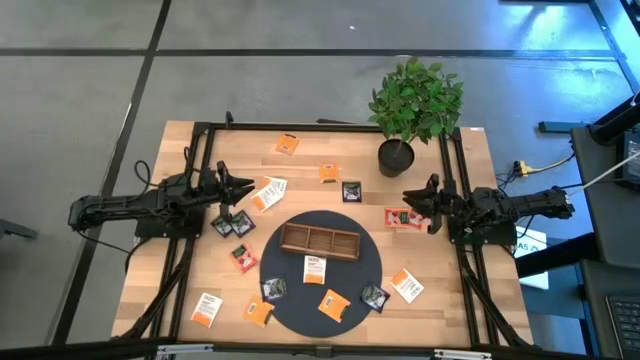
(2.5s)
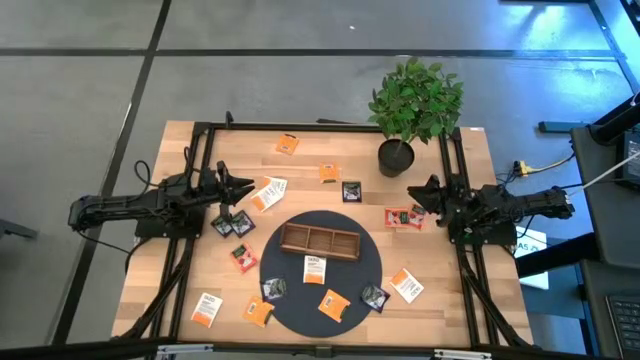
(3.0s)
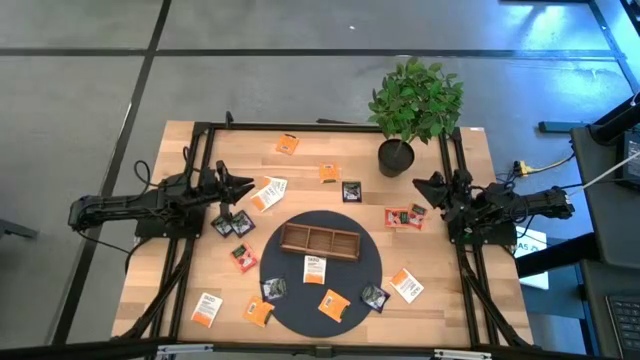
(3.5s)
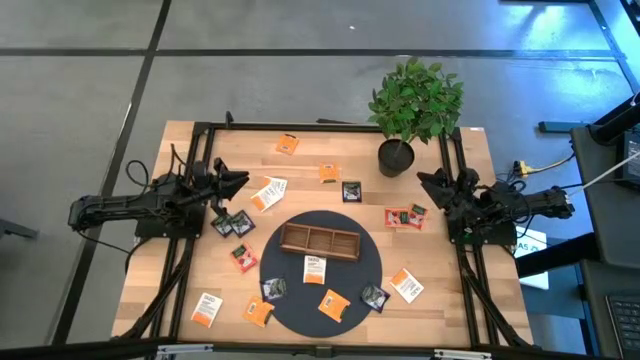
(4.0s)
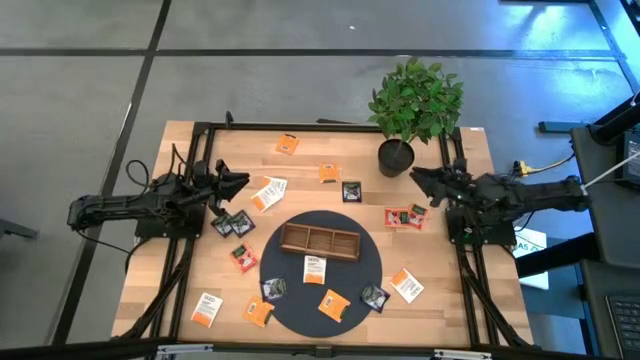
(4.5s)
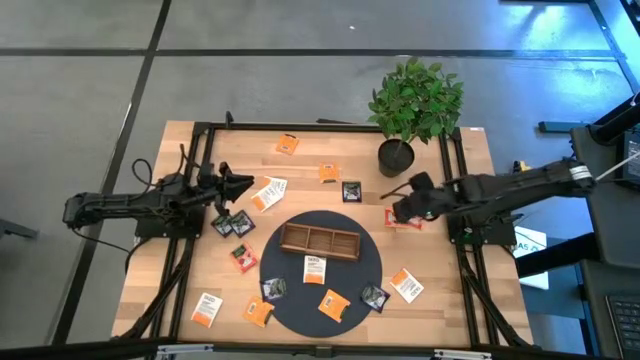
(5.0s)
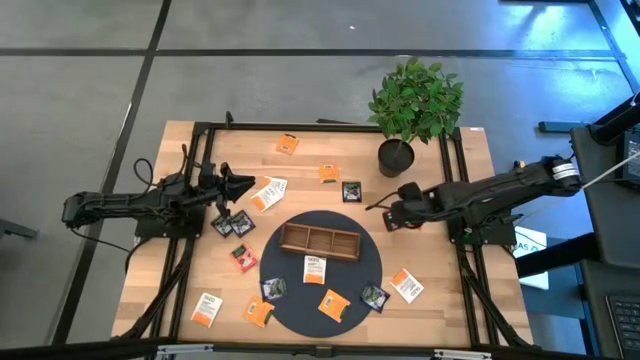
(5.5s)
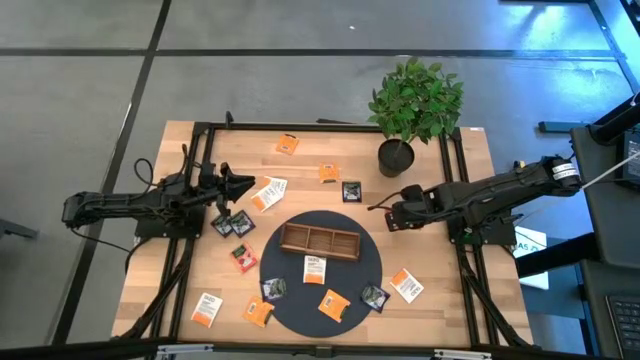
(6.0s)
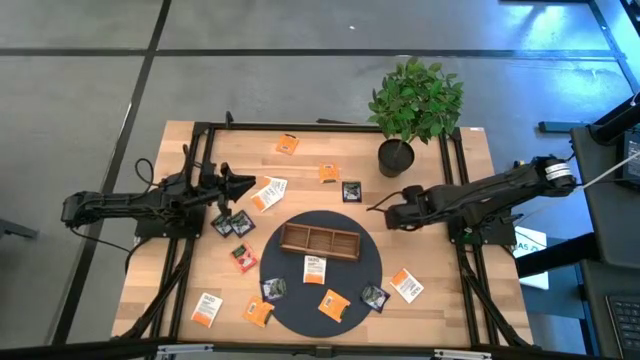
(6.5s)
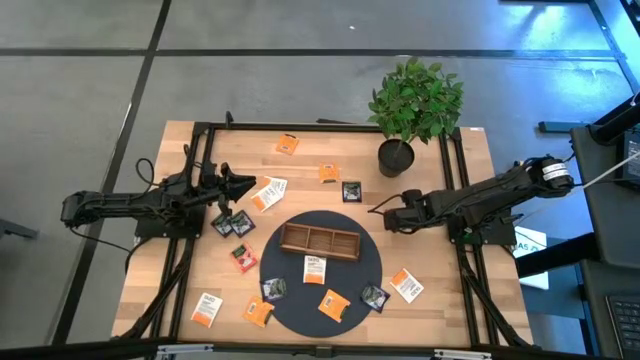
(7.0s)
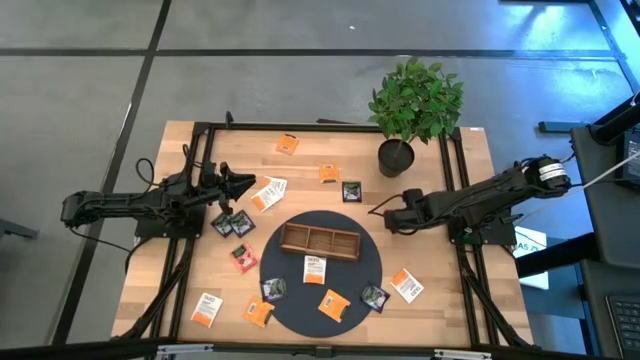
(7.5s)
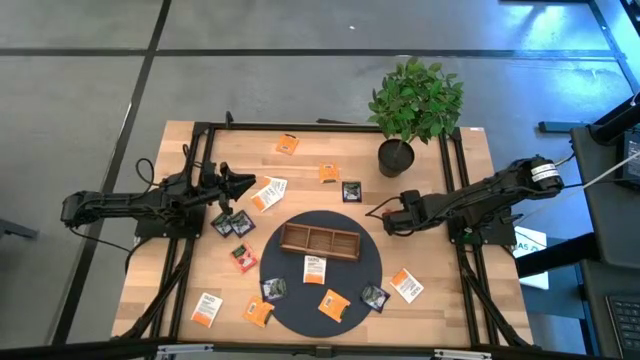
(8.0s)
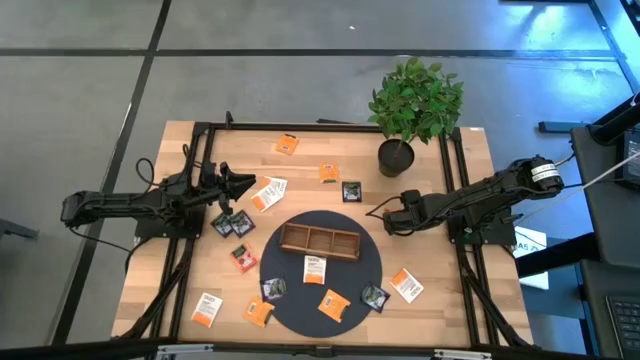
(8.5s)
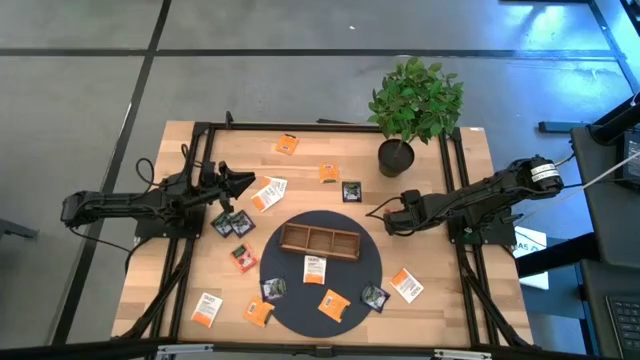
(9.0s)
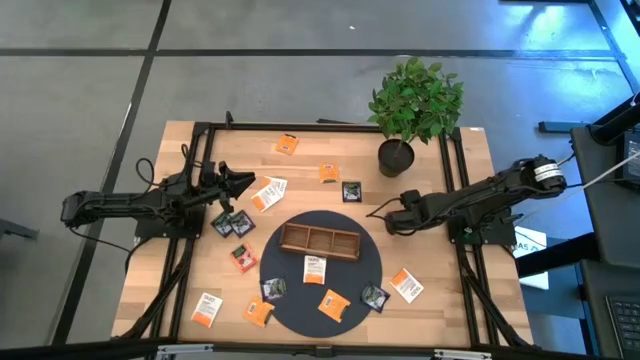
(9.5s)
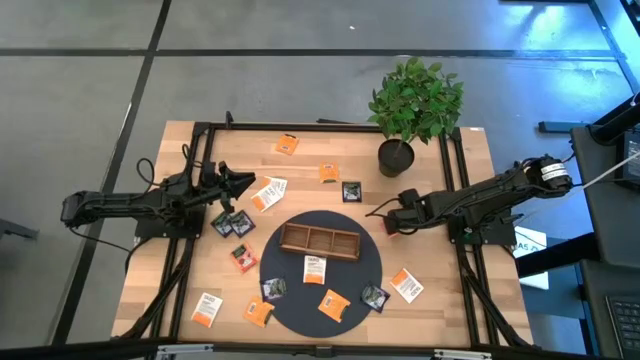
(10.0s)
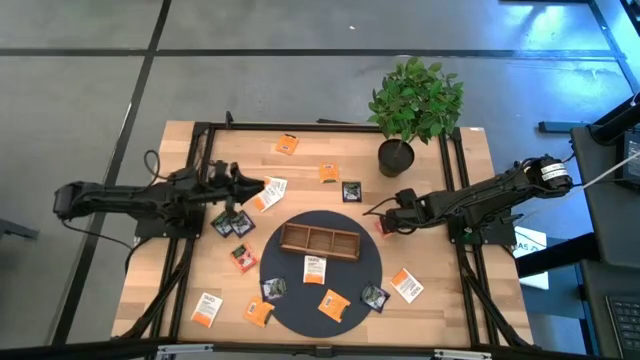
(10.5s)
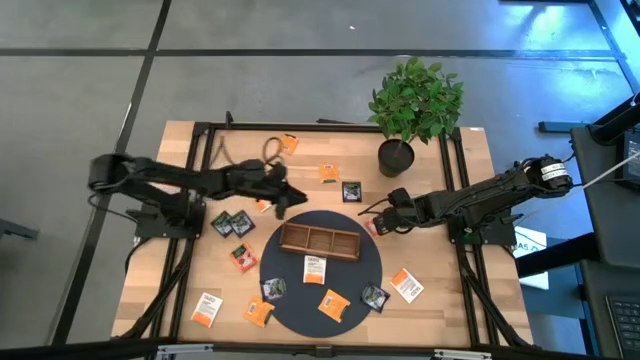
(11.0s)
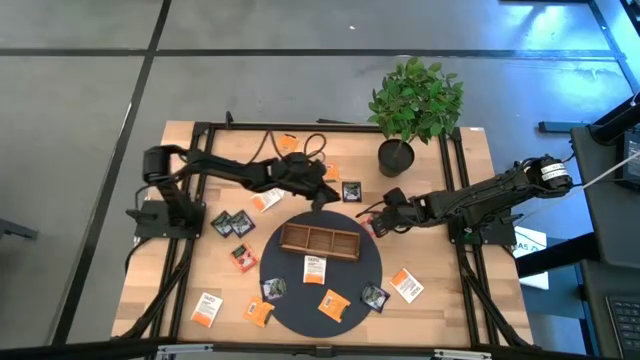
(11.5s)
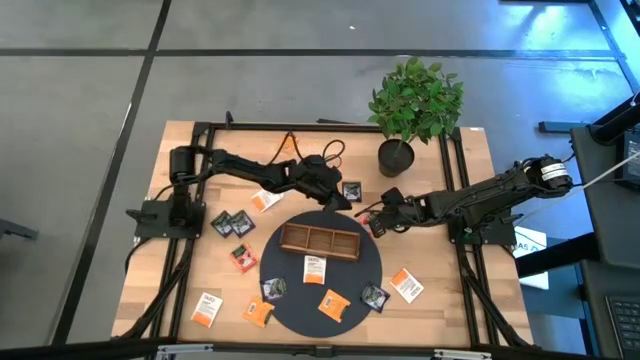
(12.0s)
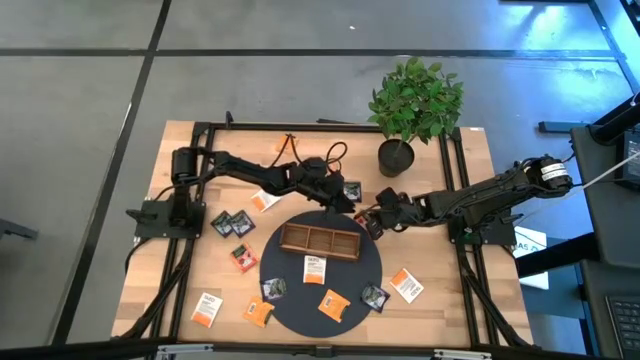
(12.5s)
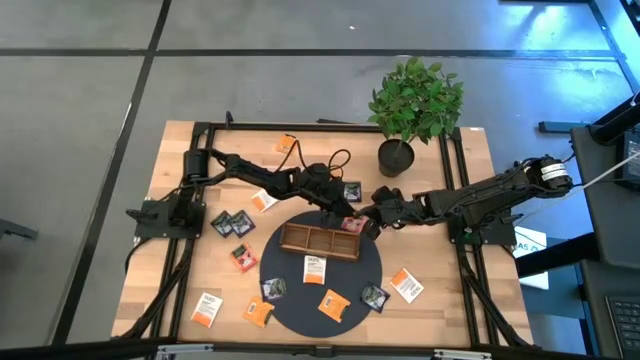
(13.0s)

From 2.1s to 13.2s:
Task: Pick & Place Tea
Put the orange tea bag into the right section of the wooden organizer

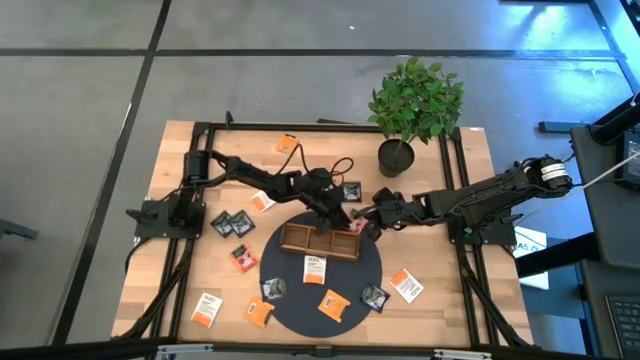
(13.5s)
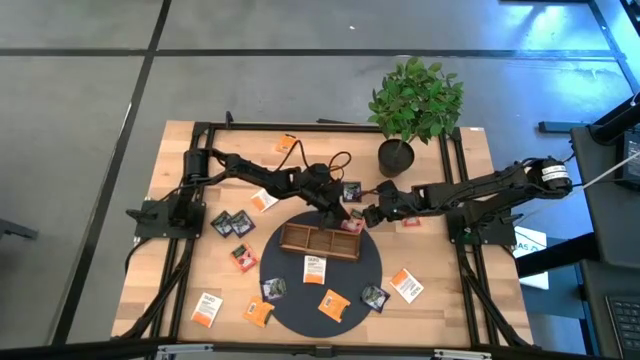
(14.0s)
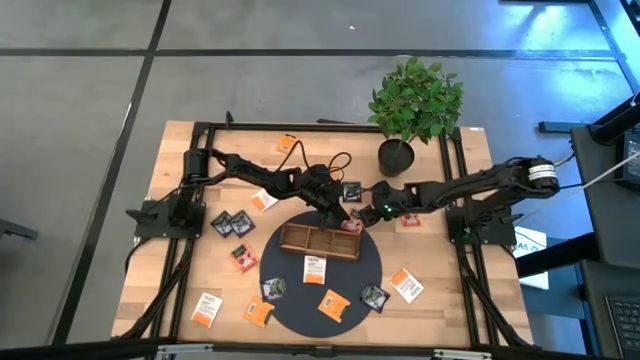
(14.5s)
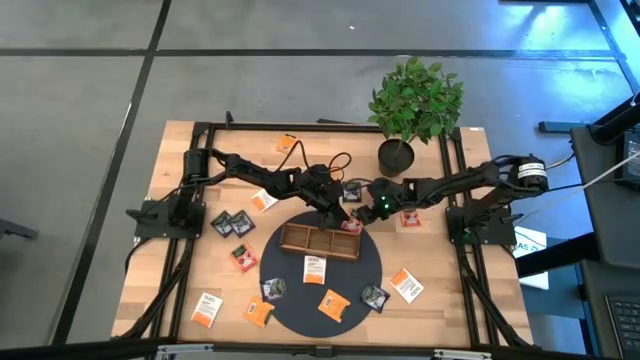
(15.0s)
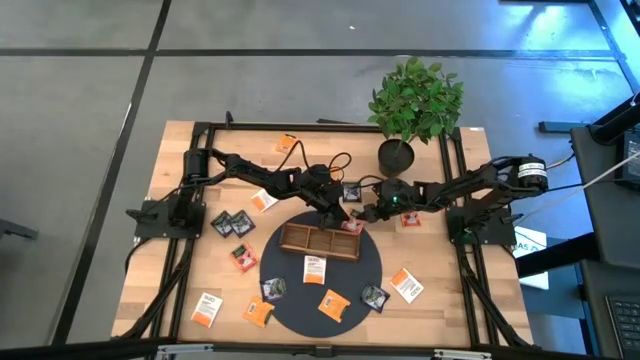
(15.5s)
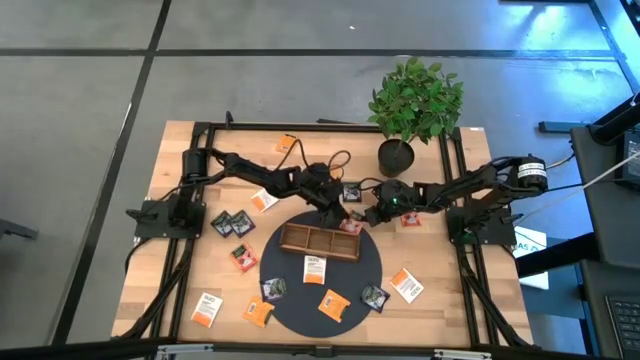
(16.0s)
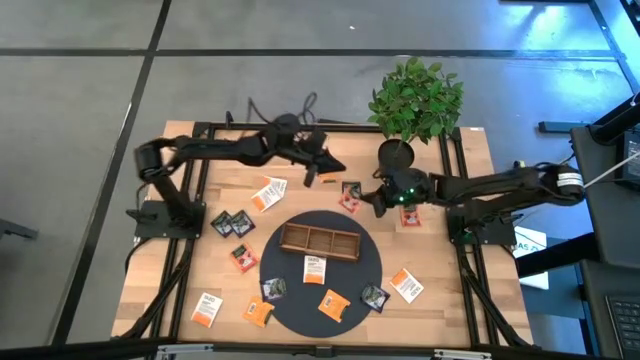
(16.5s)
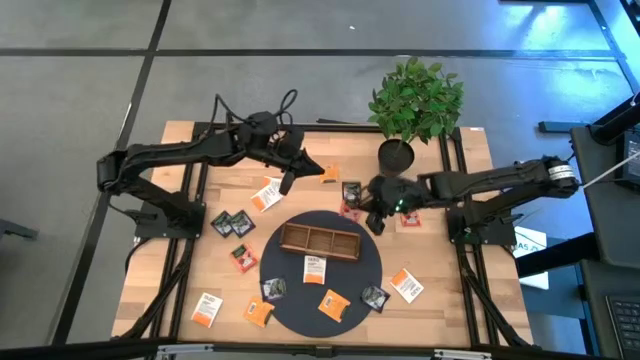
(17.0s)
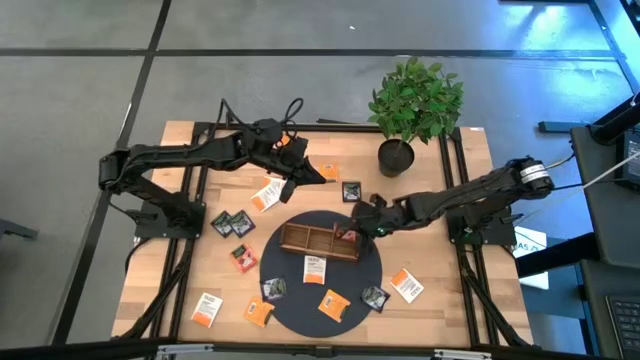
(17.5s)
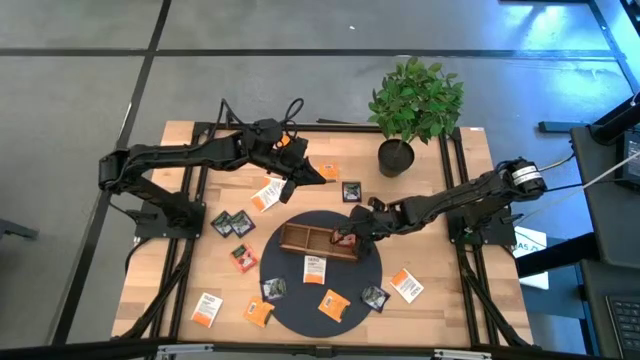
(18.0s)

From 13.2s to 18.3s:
Put the orange tea bag into the right section of the wooden organizer

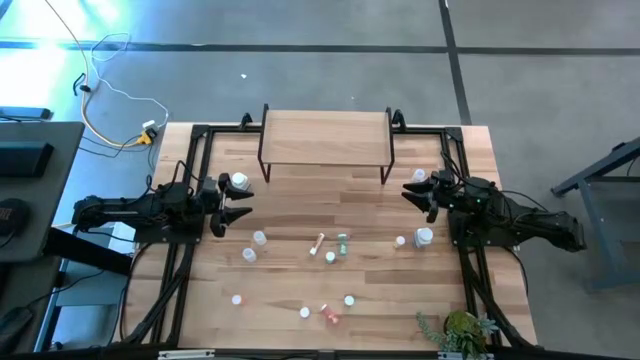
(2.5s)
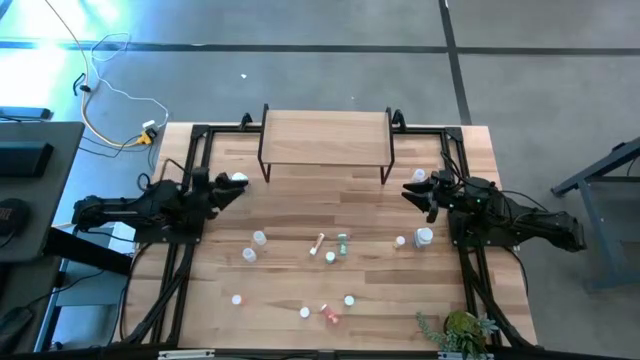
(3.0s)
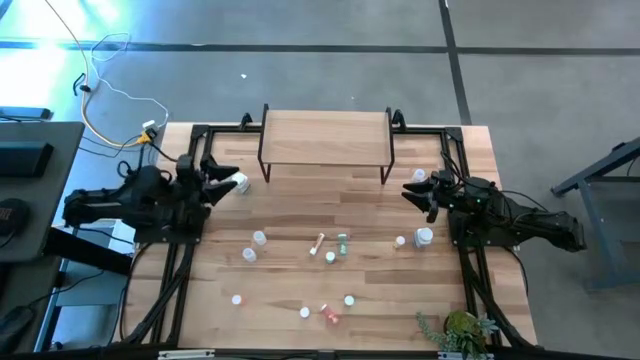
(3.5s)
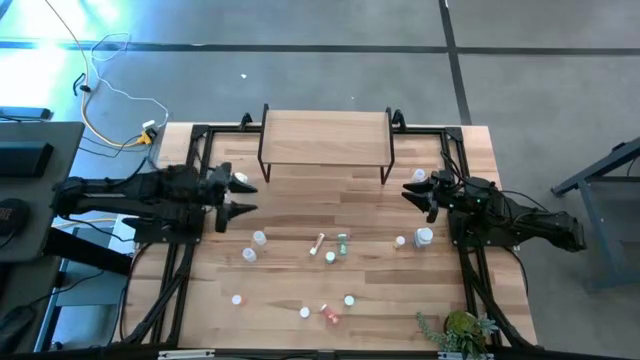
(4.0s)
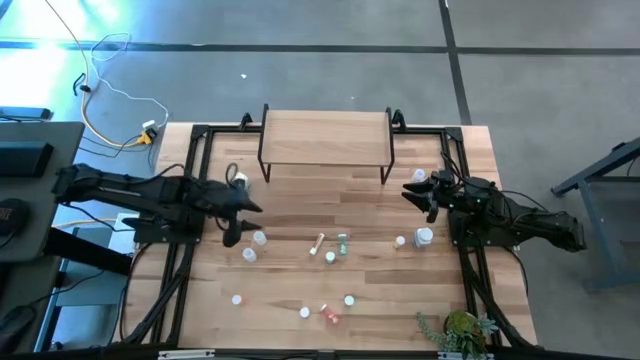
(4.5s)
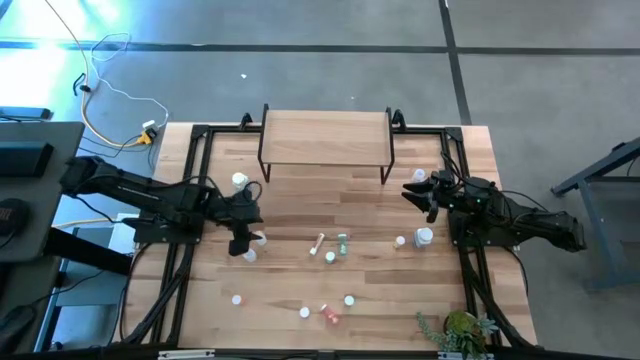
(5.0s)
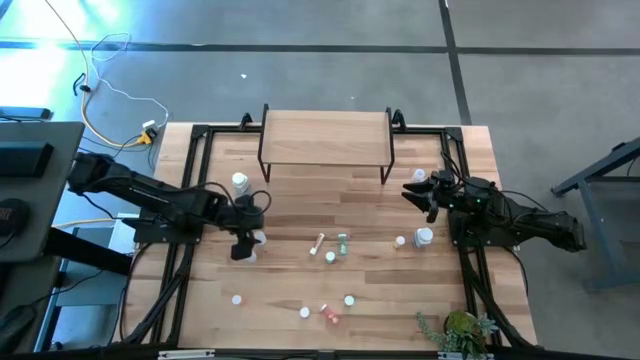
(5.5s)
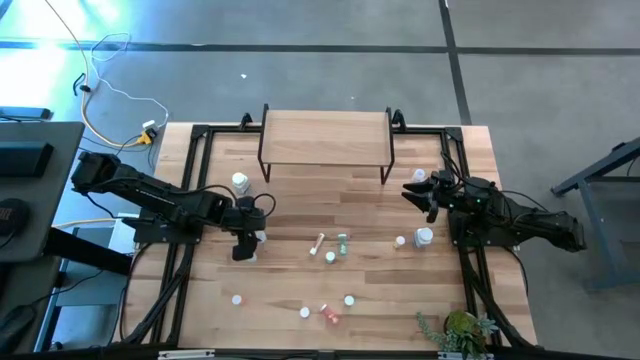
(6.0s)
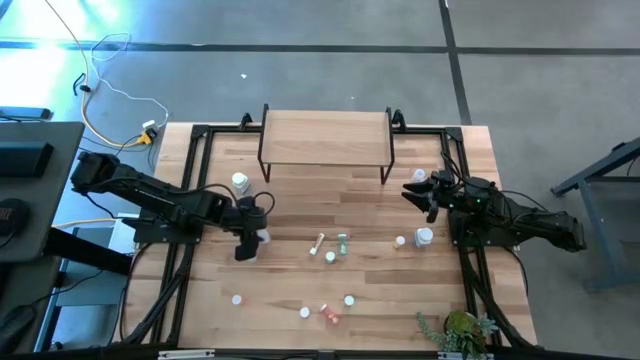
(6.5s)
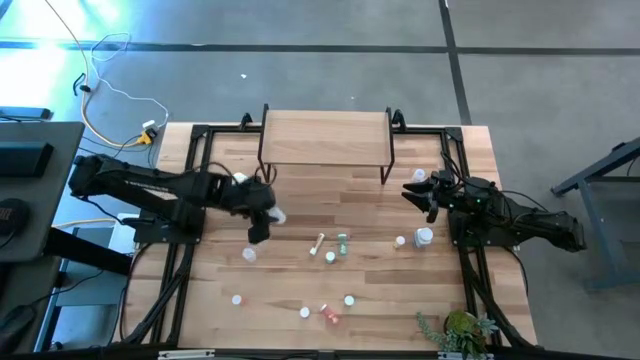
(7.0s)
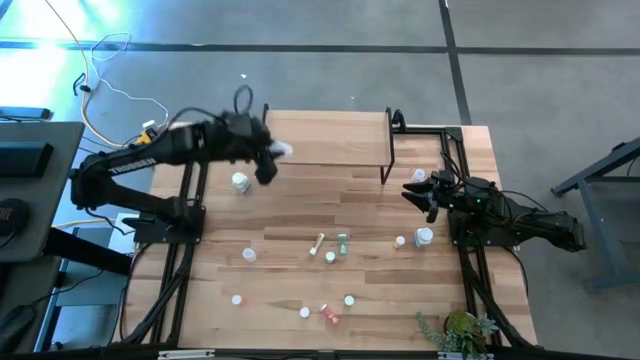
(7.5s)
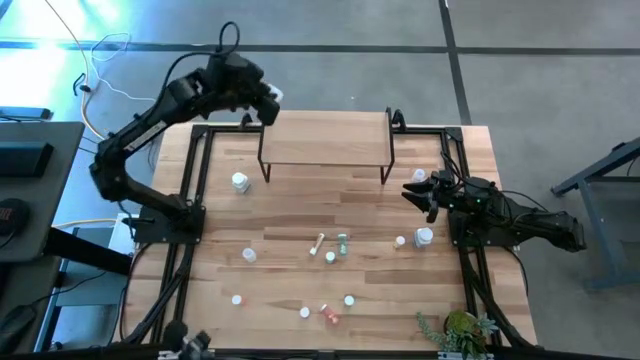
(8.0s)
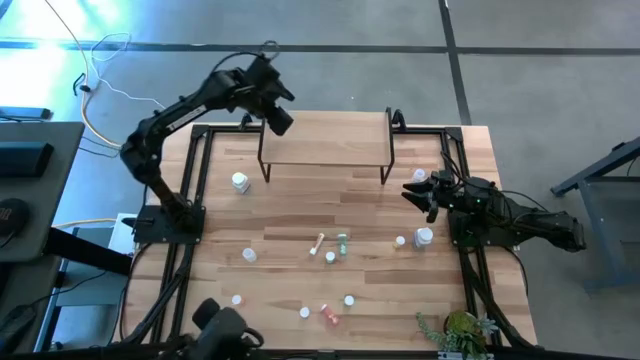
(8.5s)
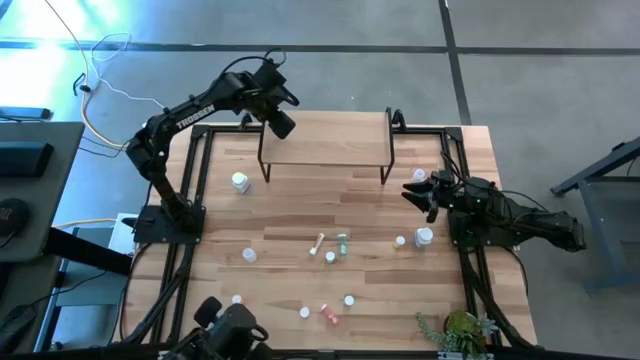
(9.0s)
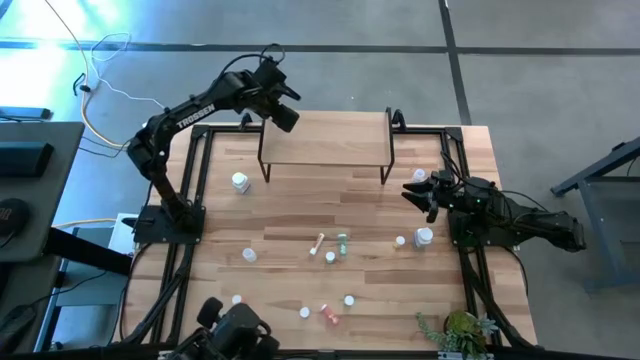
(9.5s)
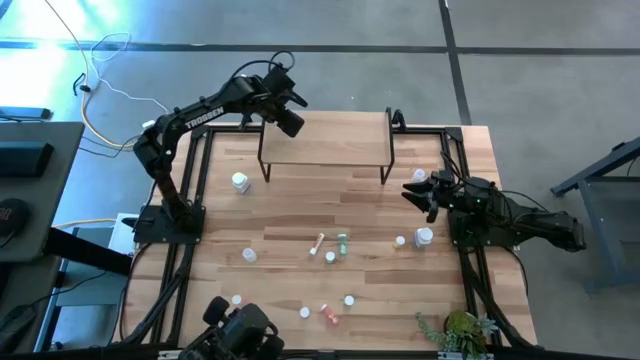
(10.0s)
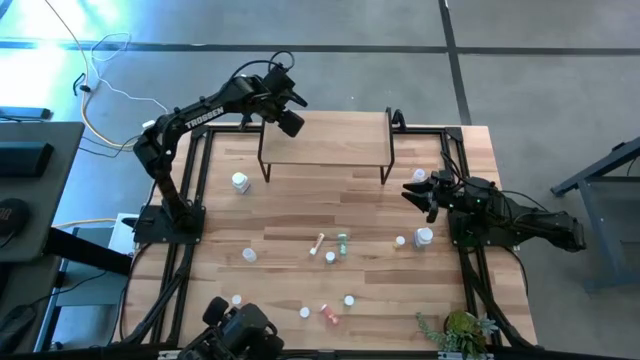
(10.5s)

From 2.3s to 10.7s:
Task: Pick and place medicine bottles onto shelf by color
Put the top small white pill bottle on the shelf
